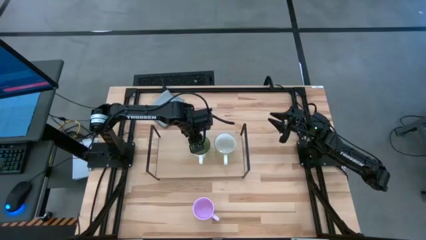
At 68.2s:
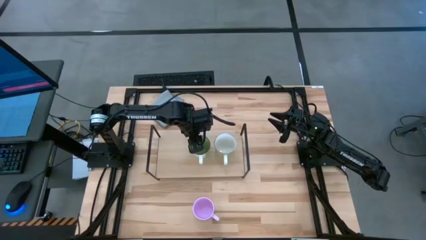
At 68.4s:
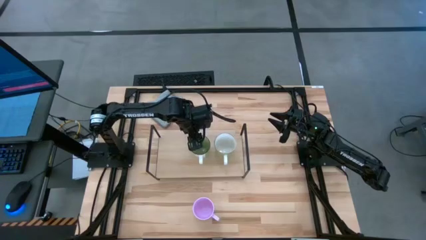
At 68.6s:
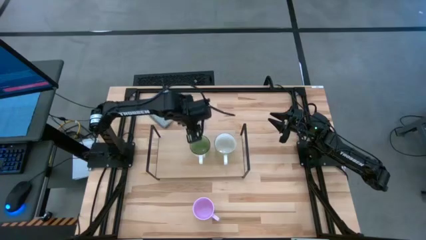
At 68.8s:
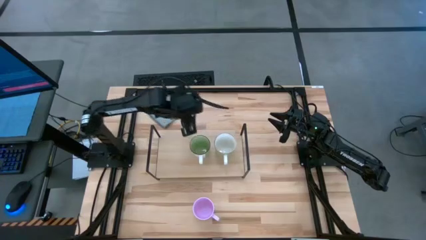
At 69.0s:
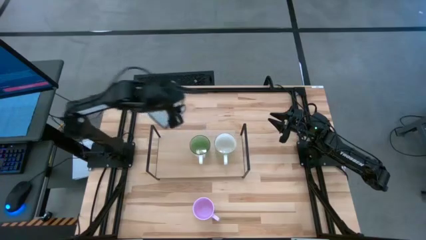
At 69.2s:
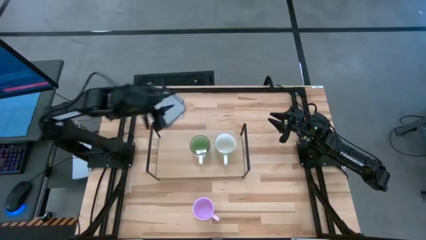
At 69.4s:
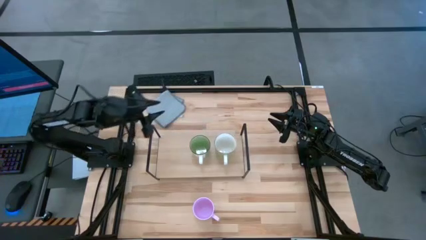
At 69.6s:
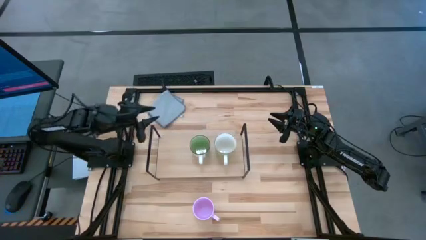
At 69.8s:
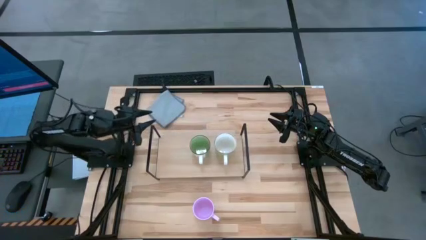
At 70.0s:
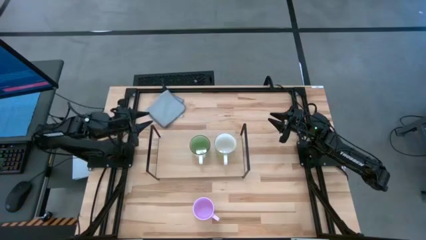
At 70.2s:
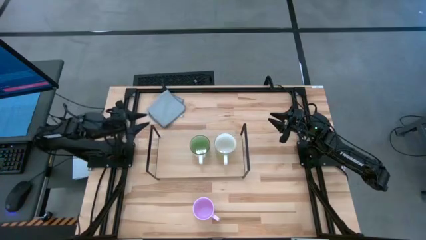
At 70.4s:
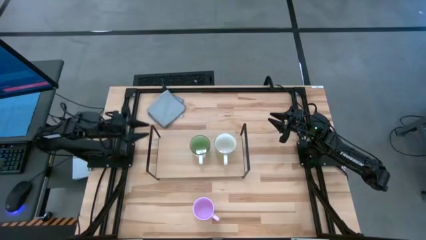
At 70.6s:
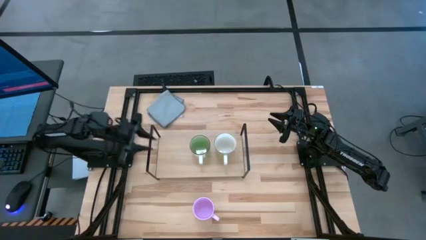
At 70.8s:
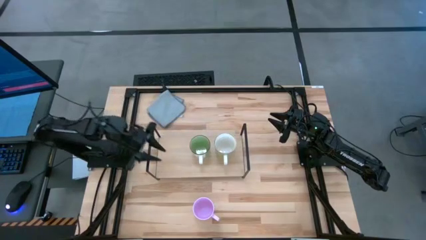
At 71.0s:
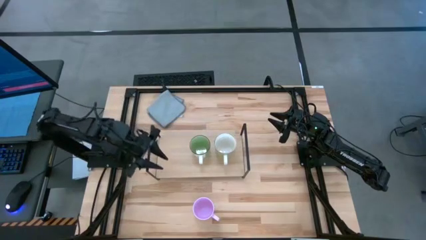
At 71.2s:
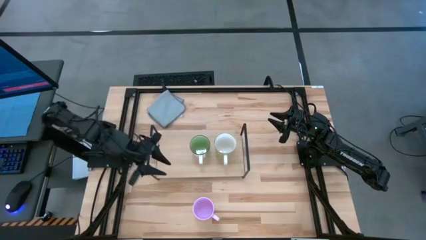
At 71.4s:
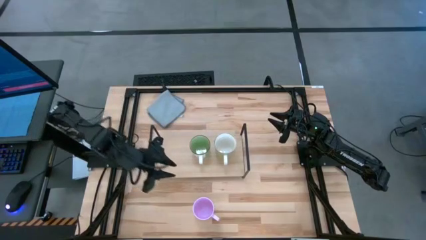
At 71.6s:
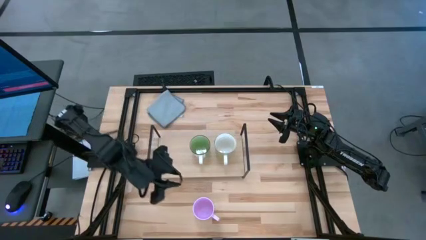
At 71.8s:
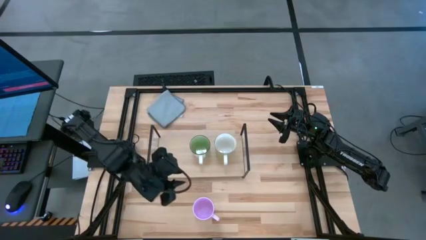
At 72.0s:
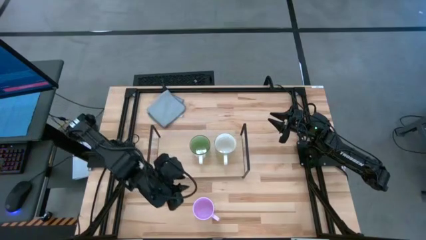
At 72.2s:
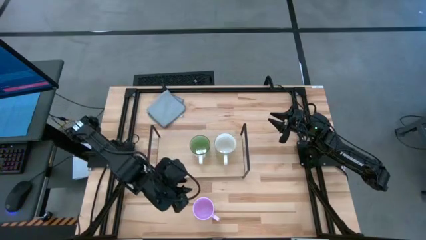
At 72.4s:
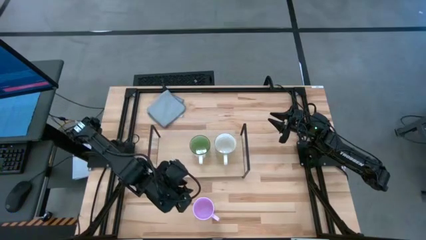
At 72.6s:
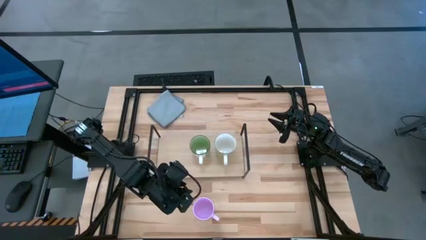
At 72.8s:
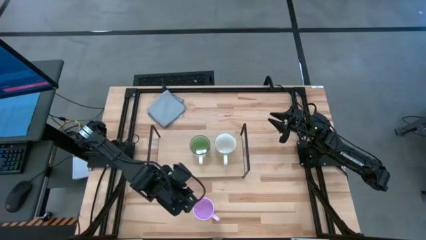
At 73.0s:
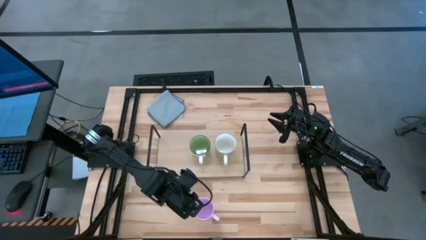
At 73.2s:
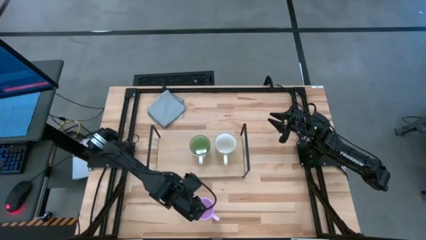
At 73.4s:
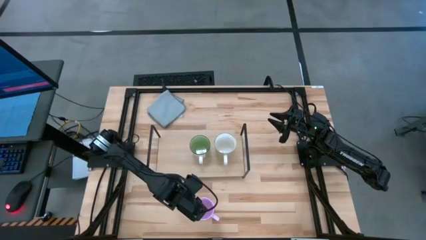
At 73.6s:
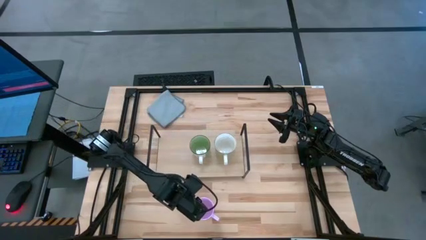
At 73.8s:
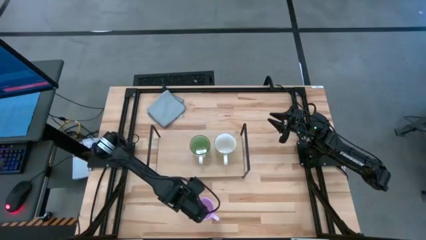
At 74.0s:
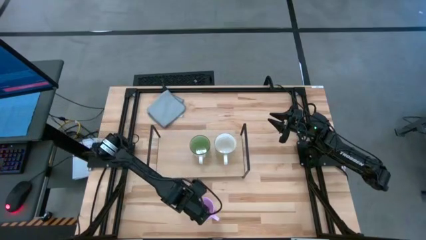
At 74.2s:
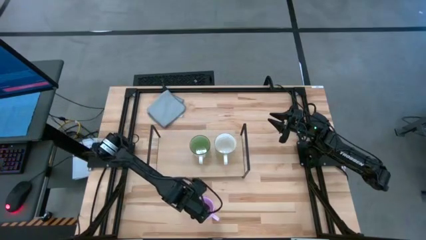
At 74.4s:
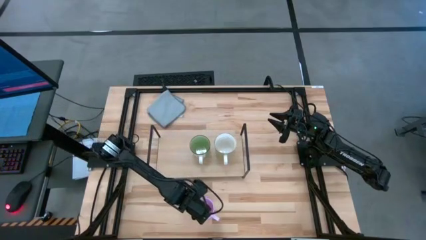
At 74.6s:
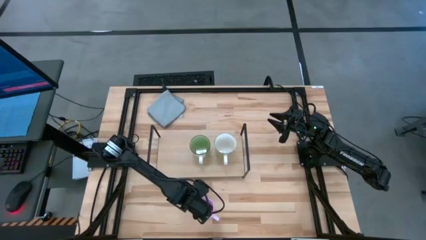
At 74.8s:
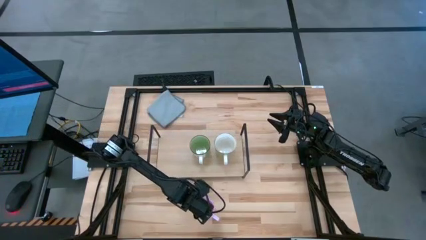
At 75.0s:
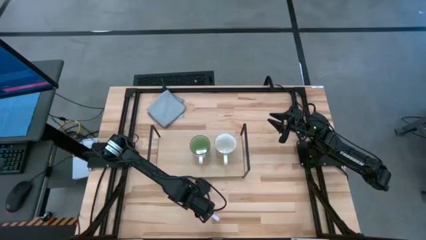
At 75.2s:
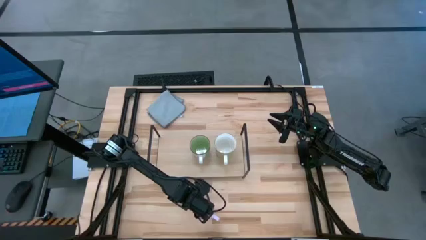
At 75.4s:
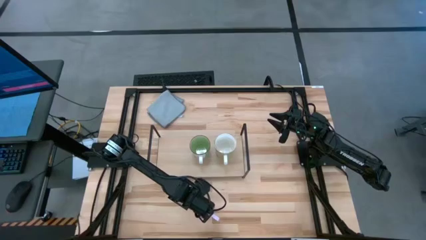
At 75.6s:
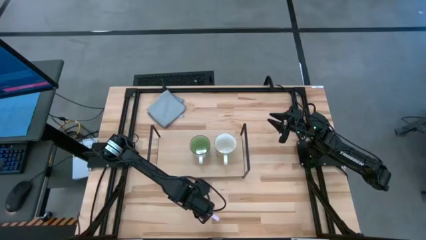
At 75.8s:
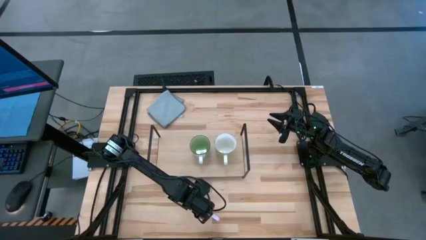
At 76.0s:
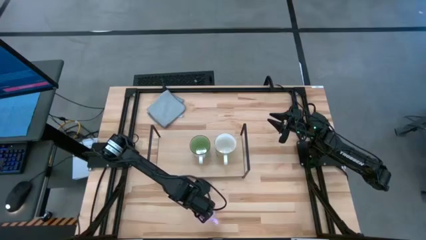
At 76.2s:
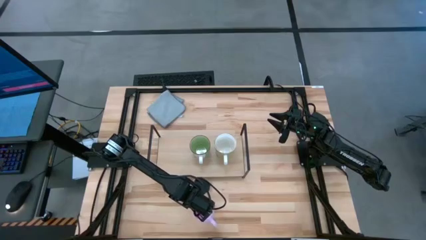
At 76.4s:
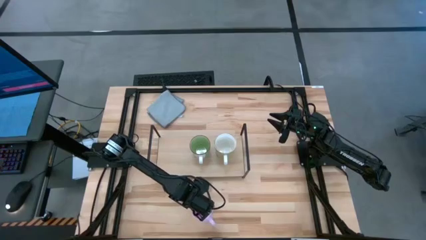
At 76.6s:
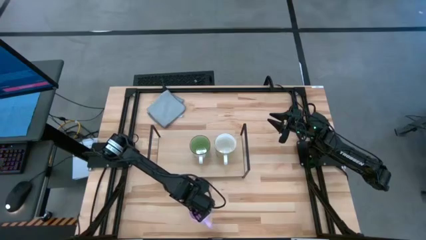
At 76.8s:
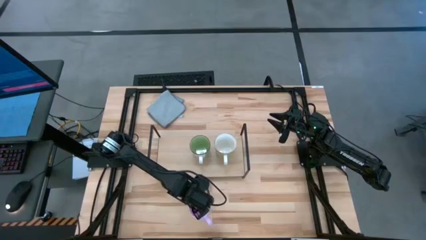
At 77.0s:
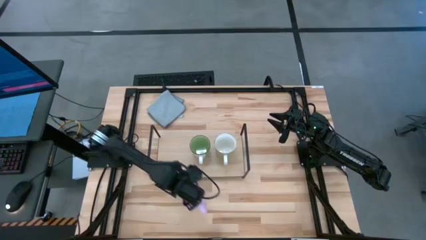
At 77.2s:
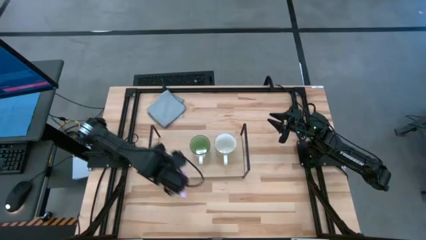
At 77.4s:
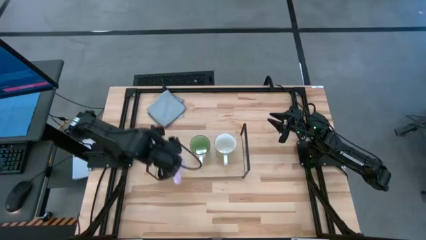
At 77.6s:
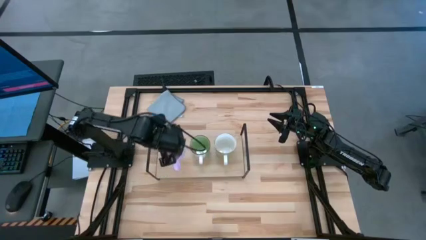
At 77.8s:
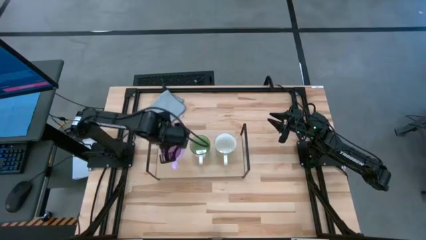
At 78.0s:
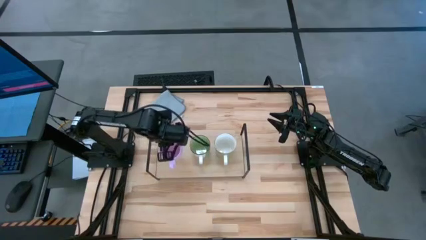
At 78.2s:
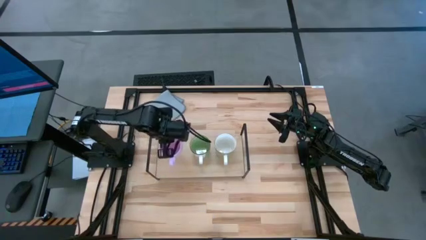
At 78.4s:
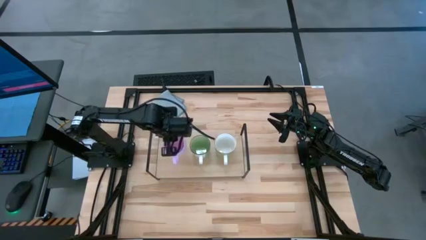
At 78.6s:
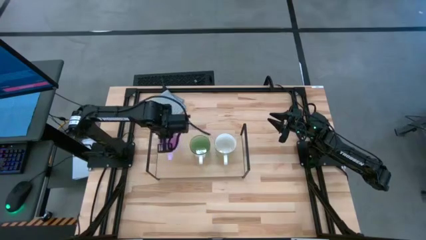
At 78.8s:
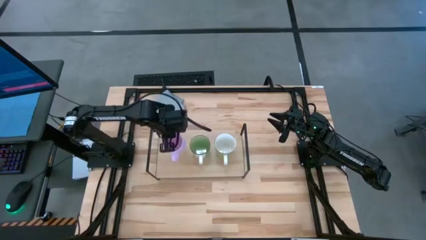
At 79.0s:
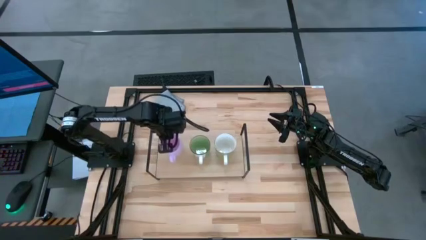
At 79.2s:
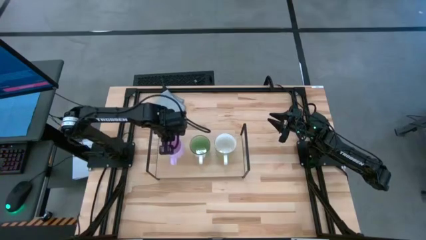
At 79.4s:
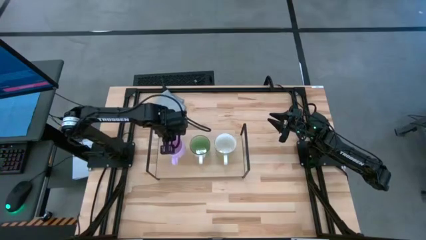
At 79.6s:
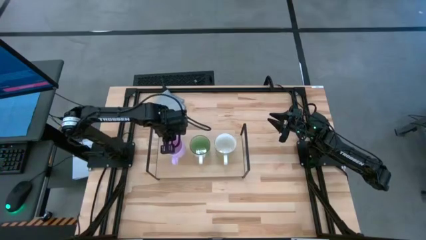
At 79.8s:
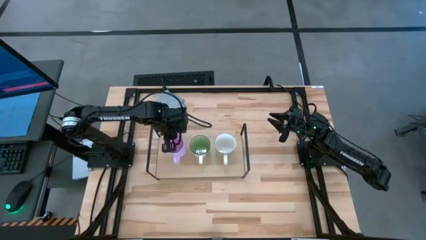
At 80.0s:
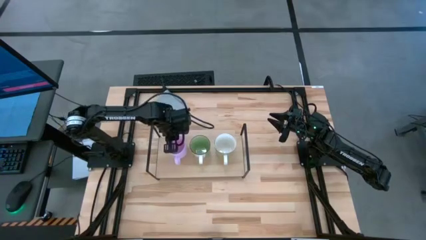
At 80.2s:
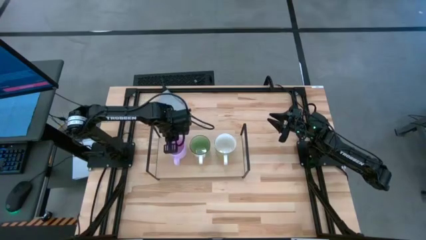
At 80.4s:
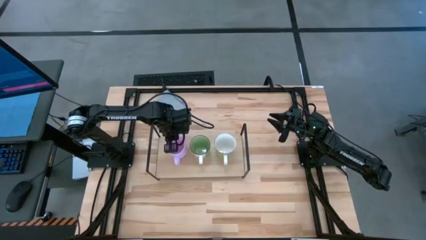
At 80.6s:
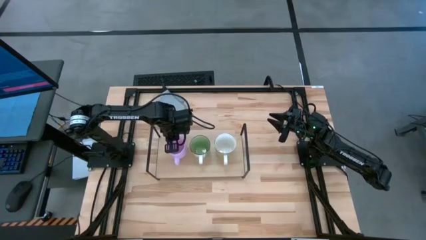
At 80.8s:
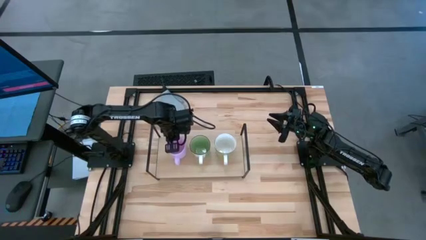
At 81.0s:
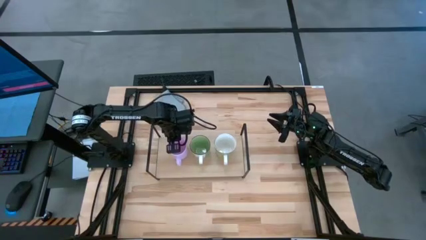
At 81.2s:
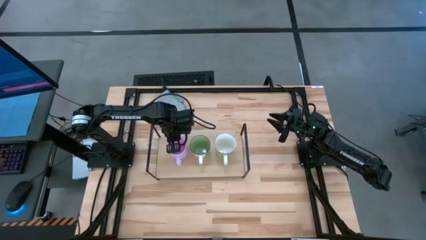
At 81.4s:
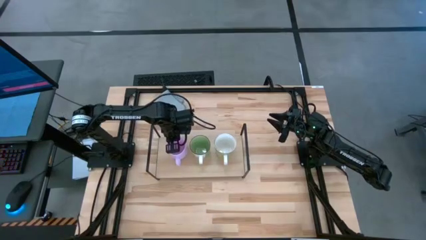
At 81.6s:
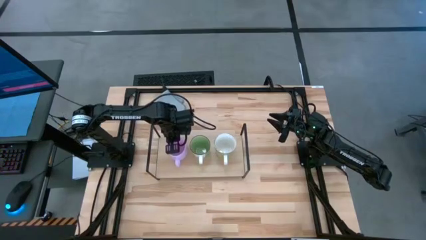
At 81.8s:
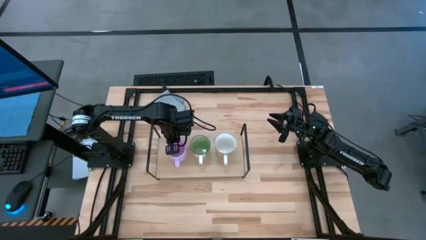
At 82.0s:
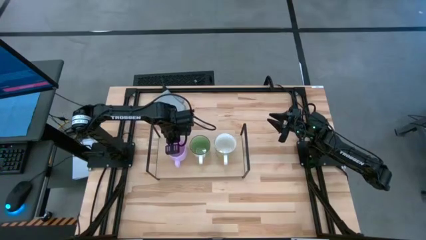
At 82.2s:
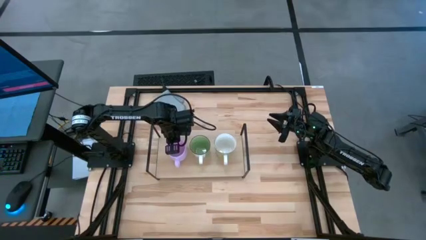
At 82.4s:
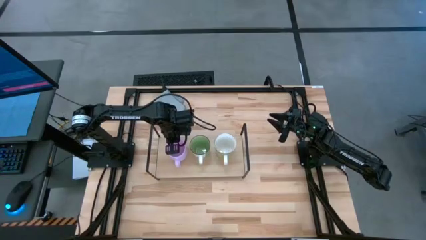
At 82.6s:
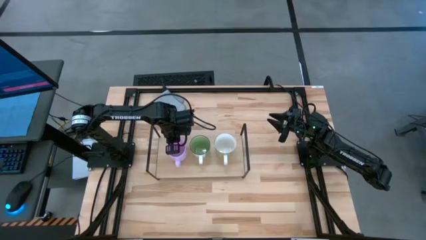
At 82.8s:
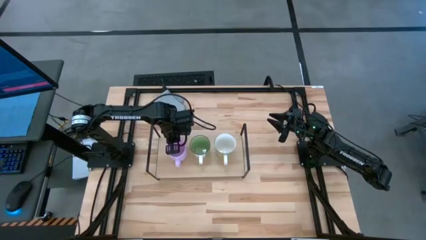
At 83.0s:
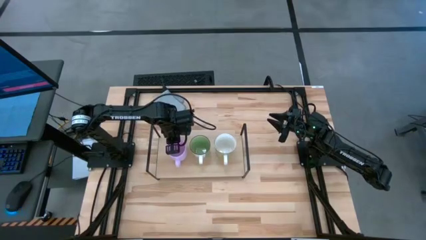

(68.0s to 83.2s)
Task: Stack small to large cups/mugs on shelf
Put the pink mug on the shelf
